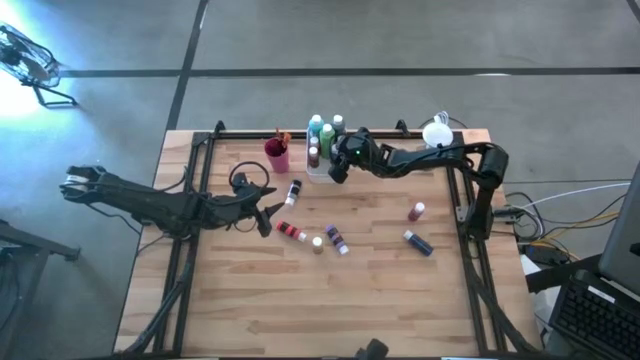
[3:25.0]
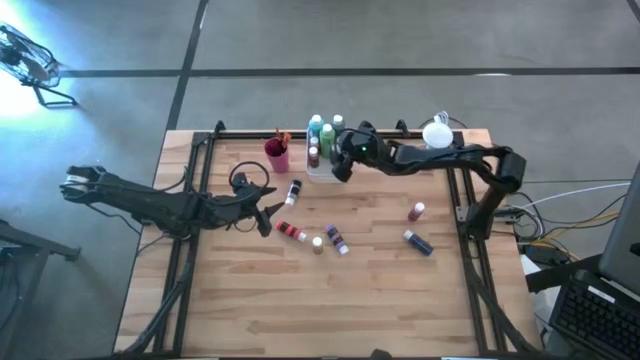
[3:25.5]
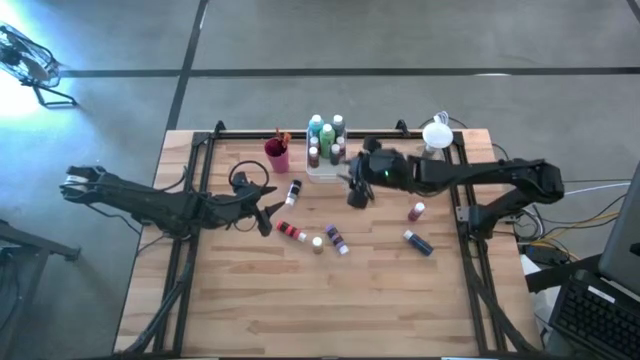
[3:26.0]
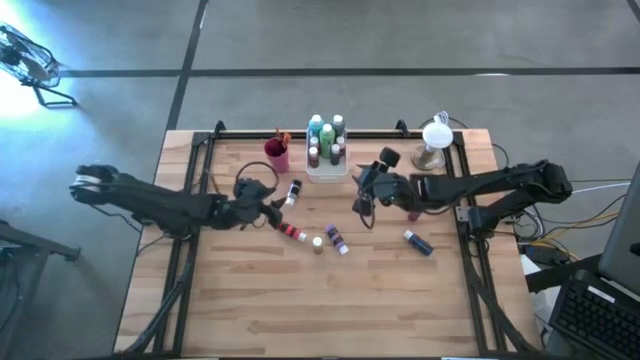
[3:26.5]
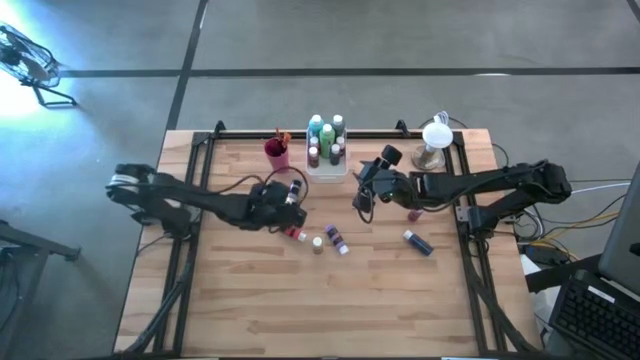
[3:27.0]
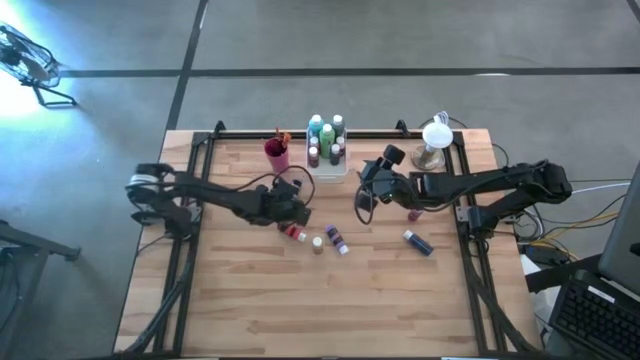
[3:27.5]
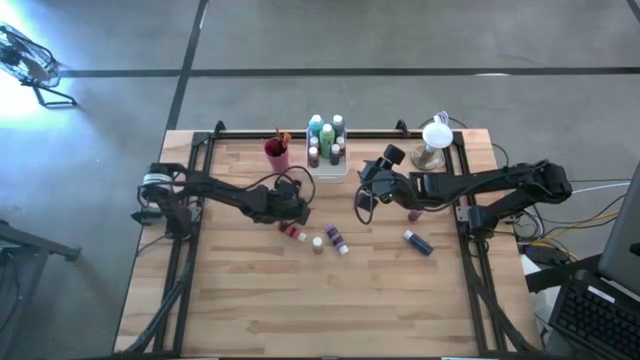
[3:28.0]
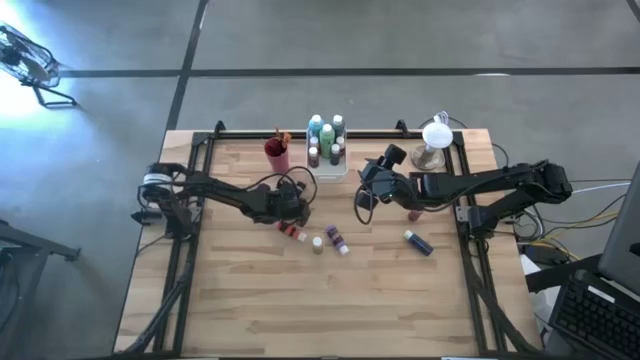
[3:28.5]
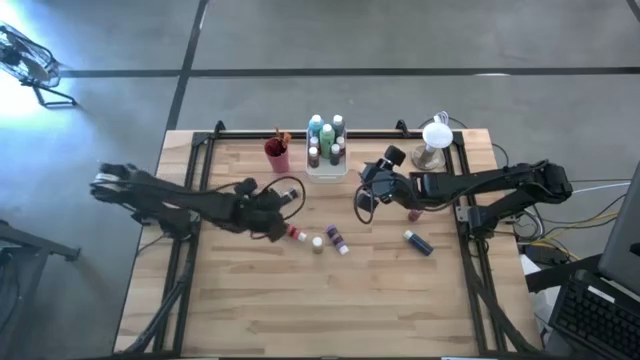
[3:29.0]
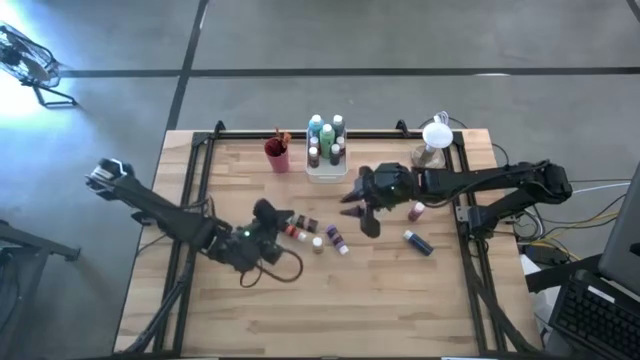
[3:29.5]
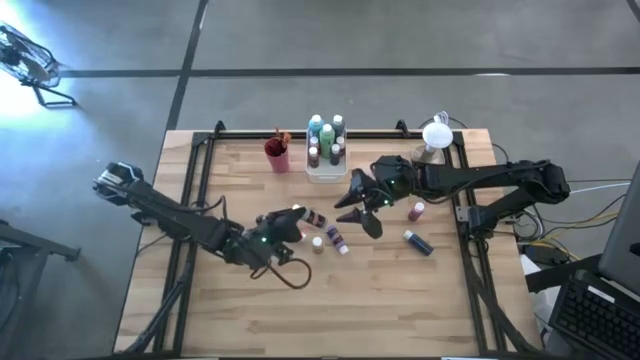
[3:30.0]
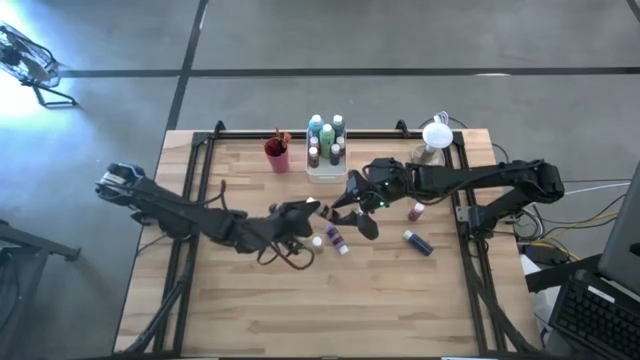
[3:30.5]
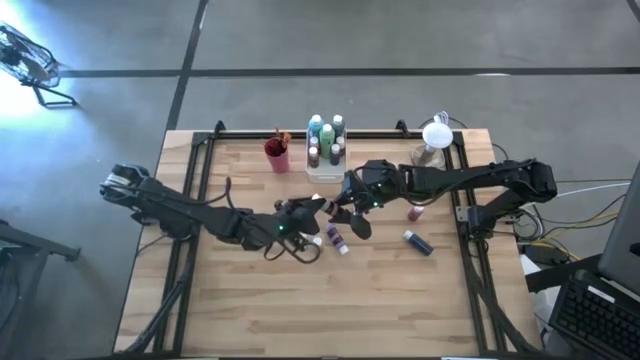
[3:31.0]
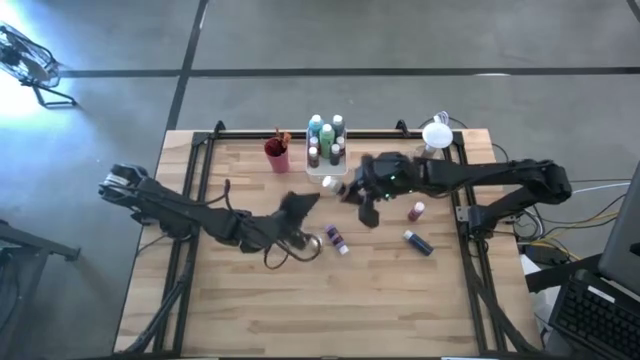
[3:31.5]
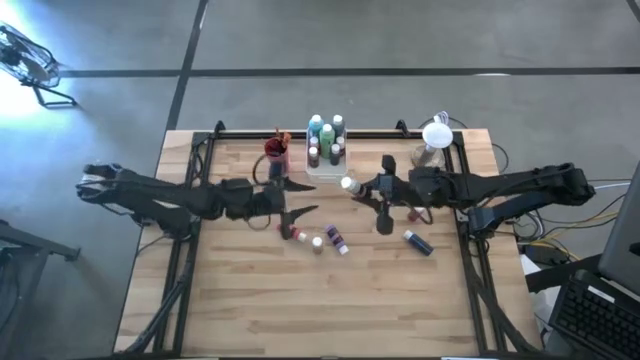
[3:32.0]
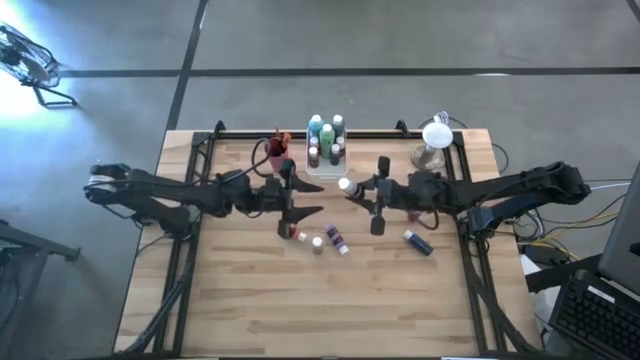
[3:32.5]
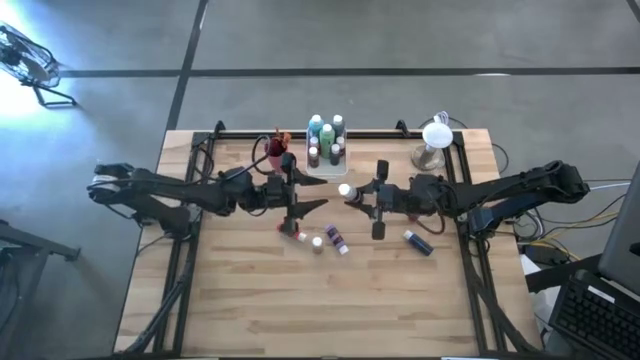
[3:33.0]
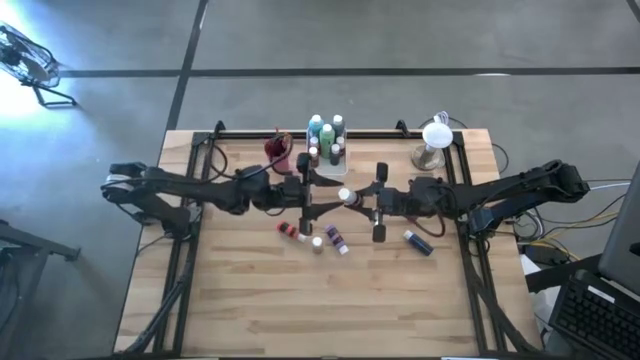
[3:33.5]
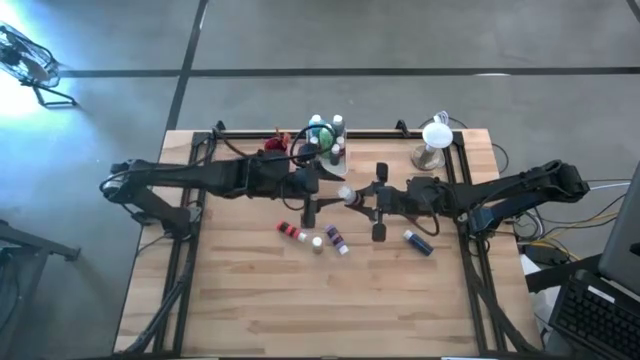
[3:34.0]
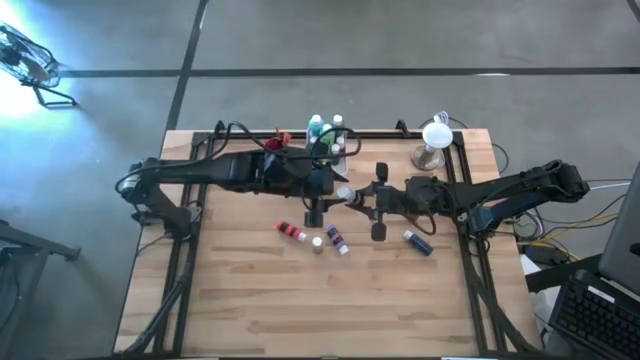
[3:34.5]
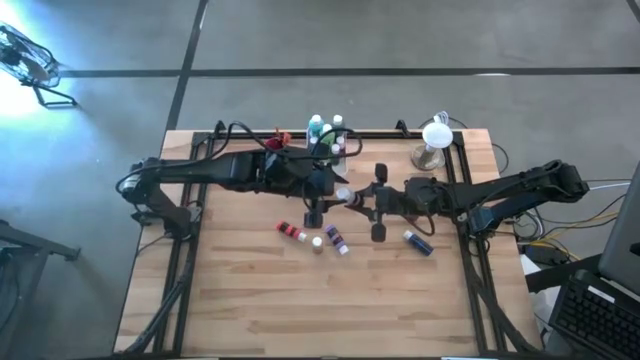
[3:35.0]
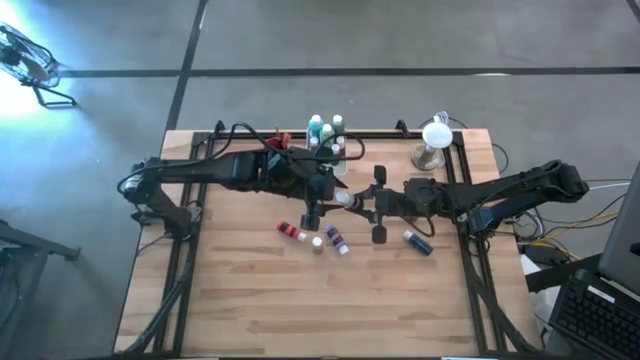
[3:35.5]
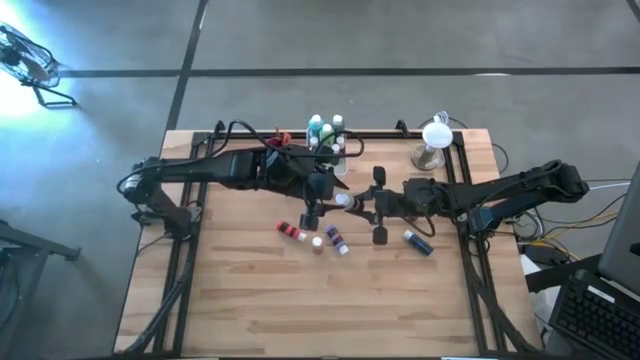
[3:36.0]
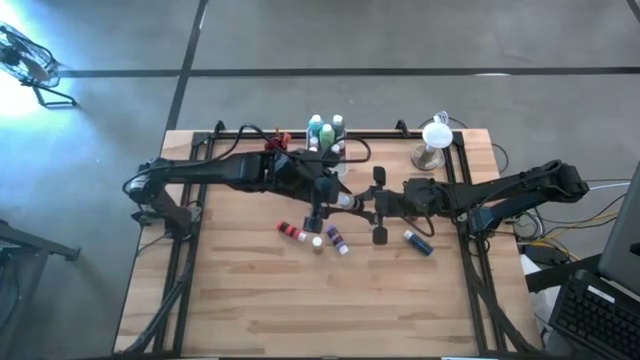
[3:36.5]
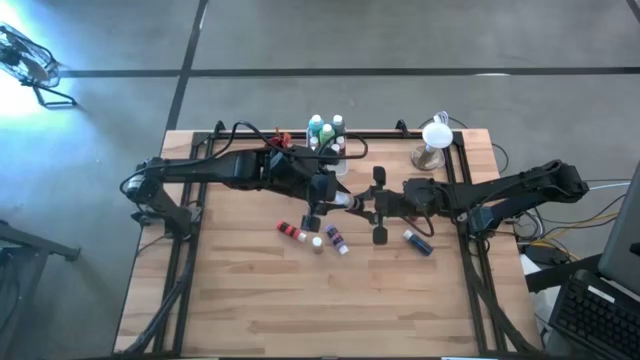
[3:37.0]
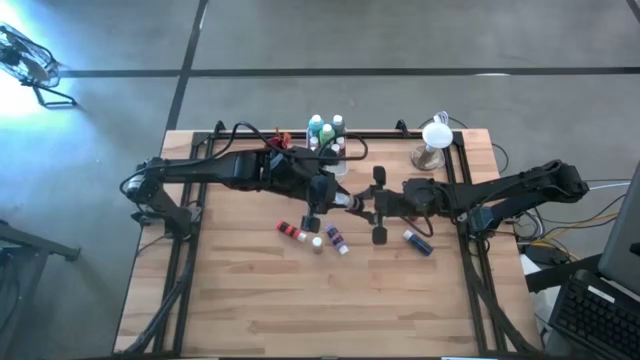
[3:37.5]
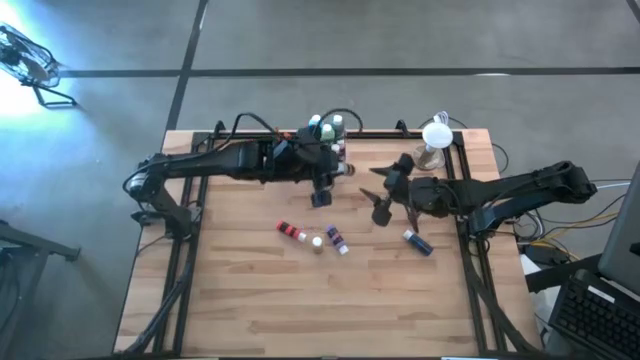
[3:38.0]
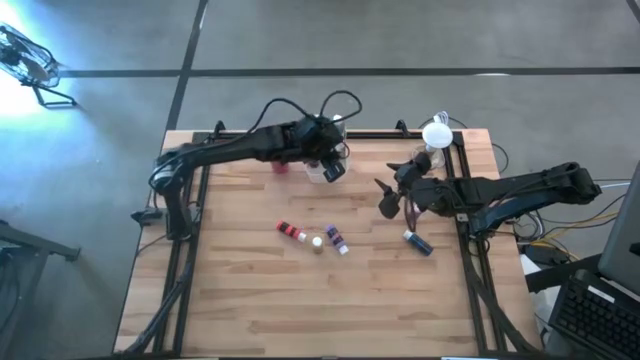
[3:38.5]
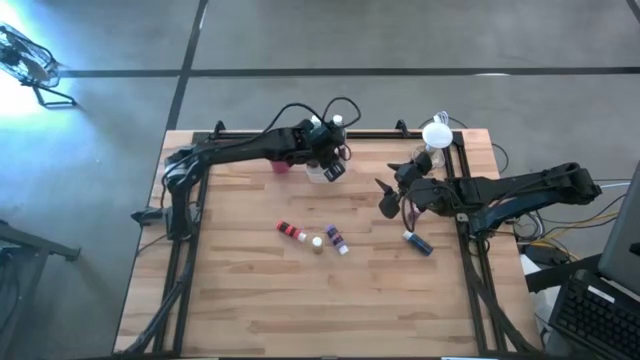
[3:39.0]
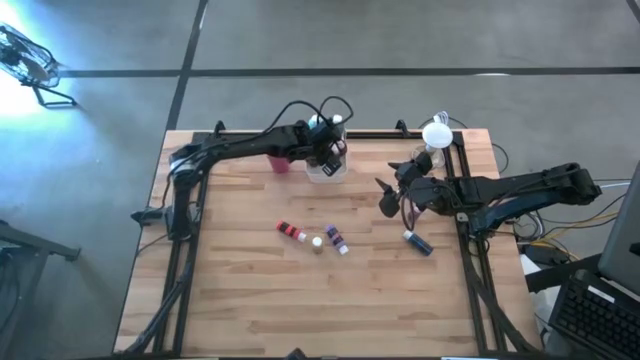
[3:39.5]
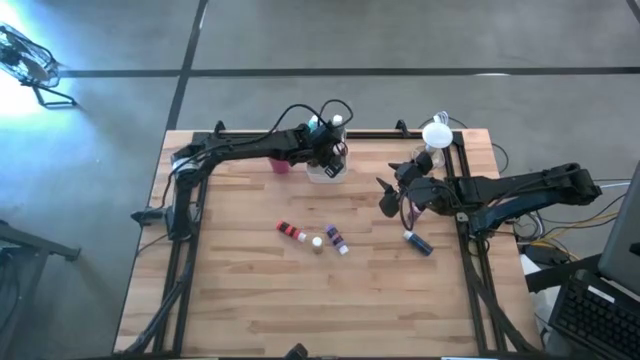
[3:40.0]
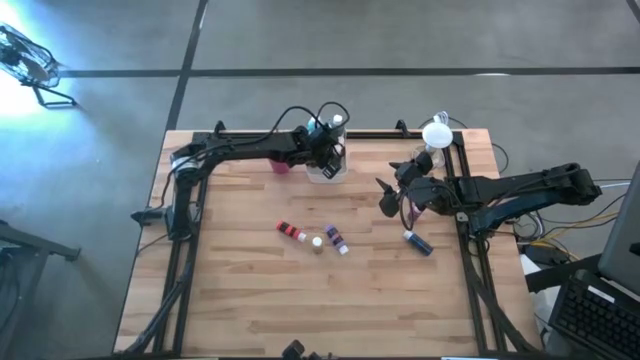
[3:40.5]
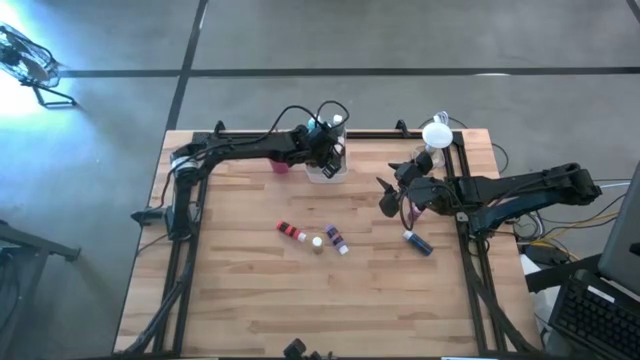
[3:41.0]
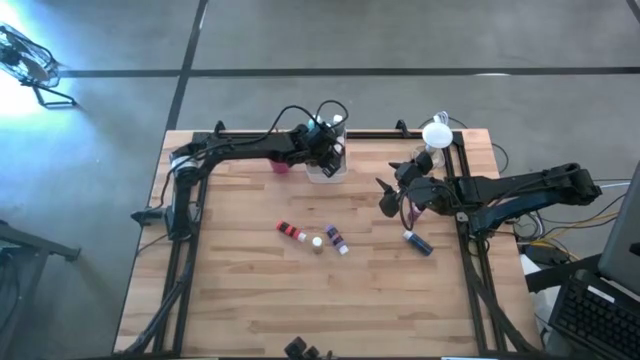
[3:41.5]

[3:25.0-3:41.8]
Task: Pick & Place Paint Supplies
Put the gray paint bottle into the white bin
